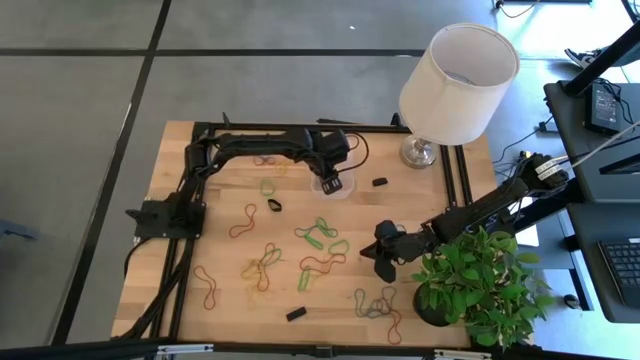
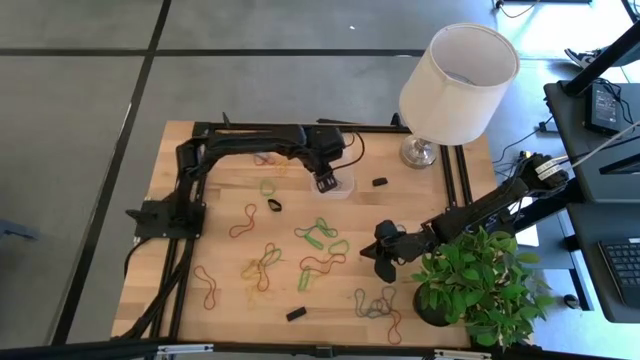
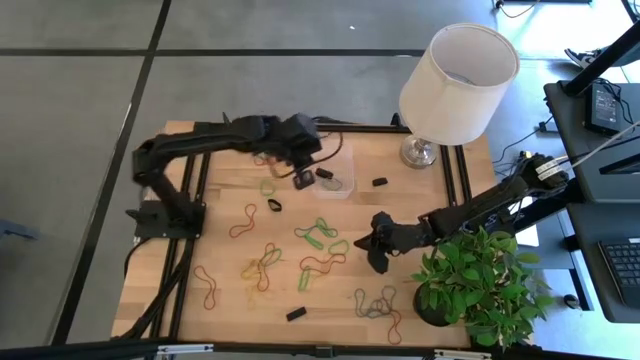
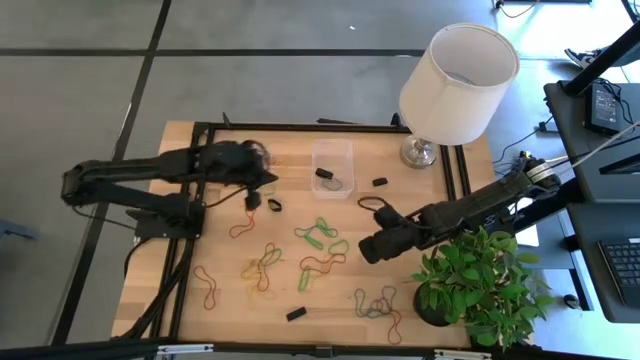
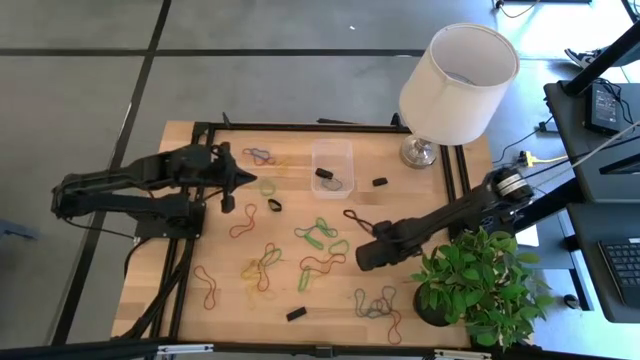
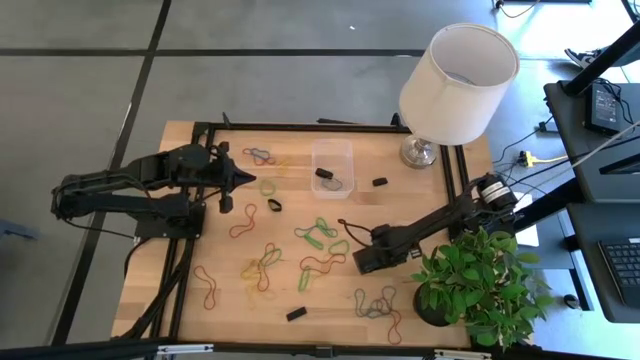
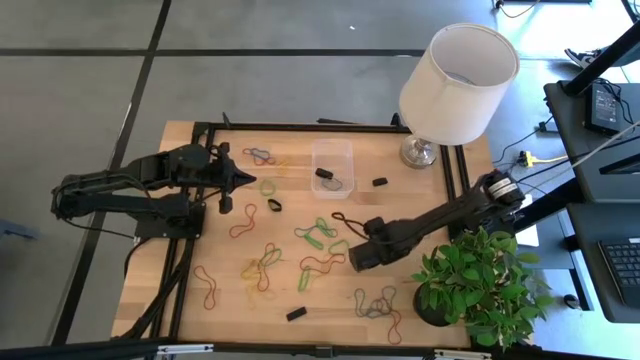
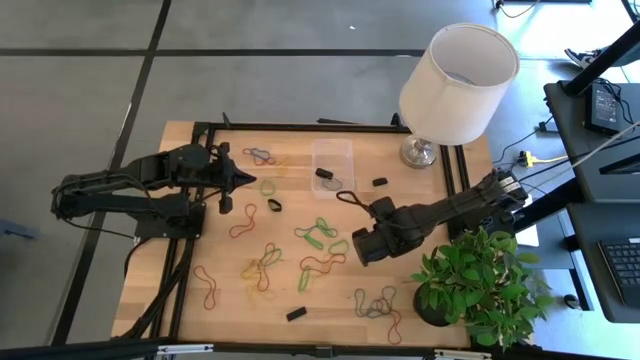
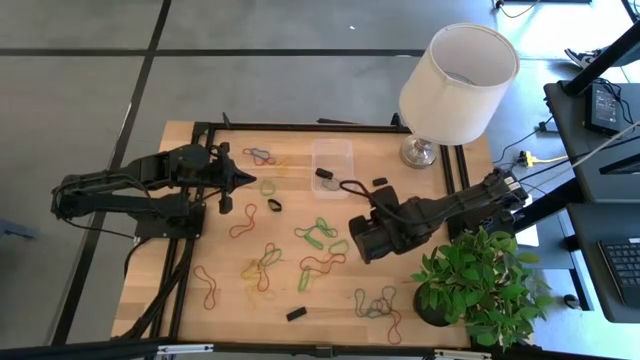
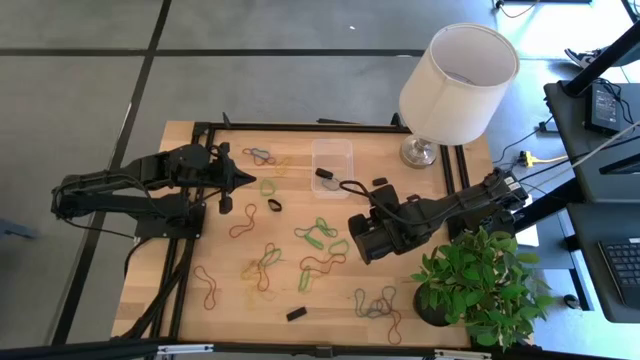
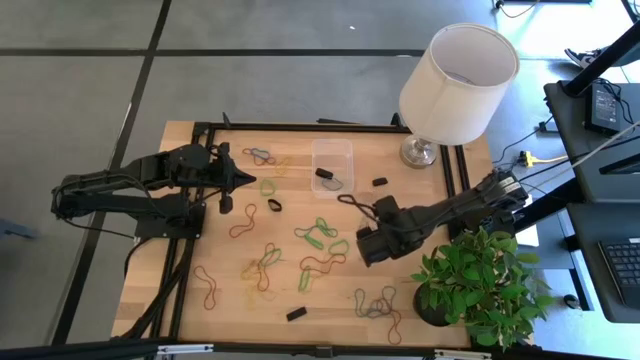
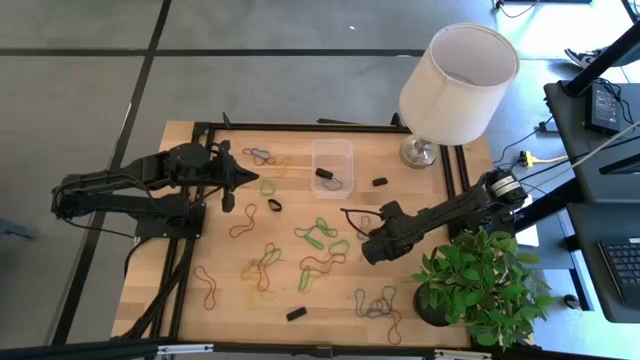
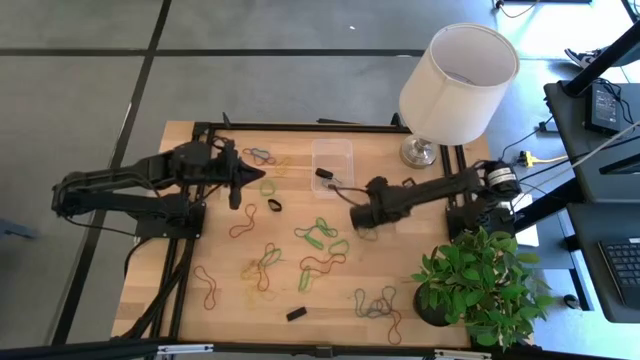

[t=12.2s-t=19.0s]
Task: Pick and place rubber bands into bin
Put the yellow rubber band into the transparent bin

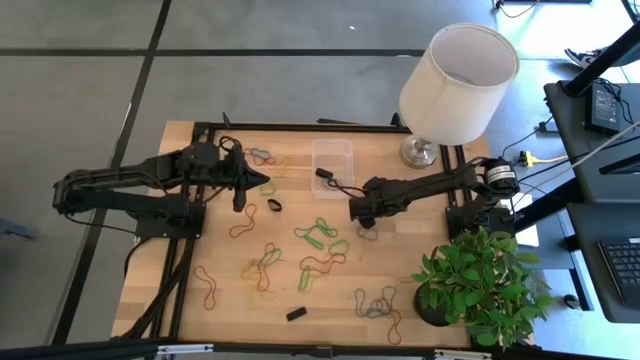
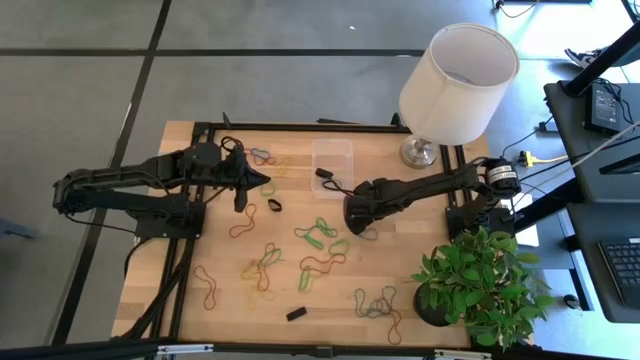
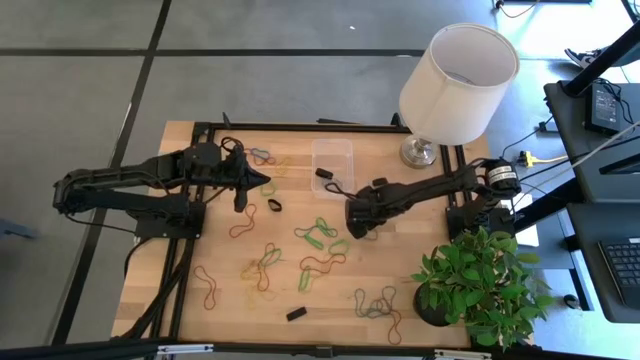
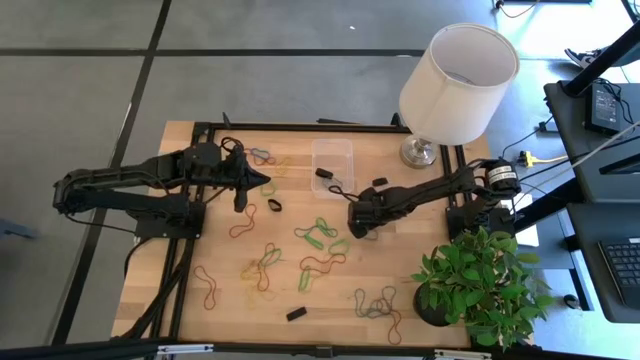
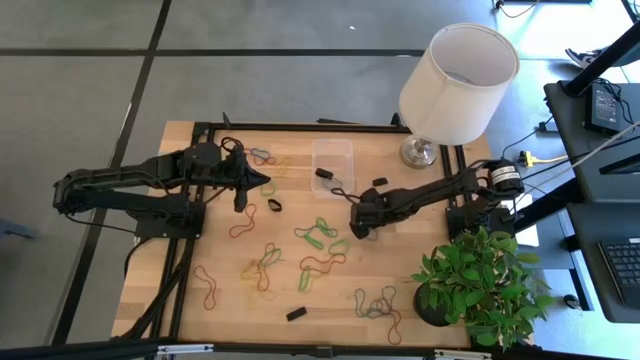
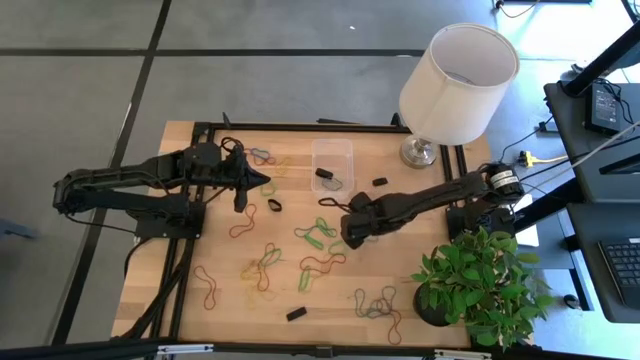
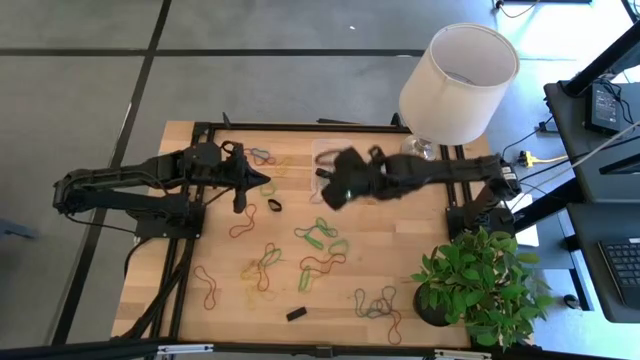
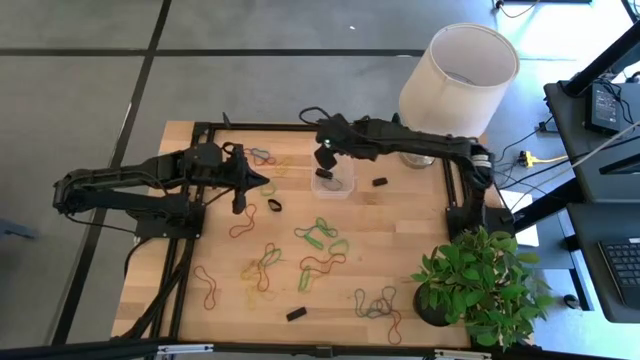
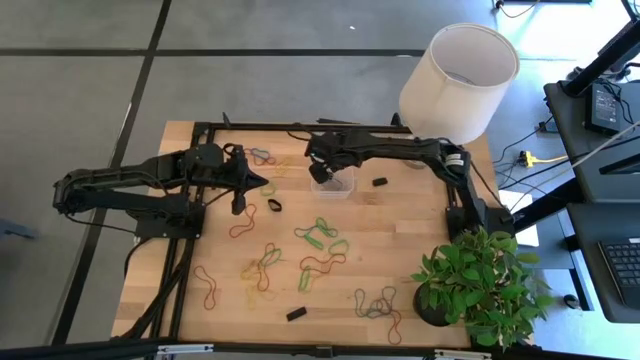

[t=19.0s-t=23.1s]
Put the blue rubber band into the transparent bin

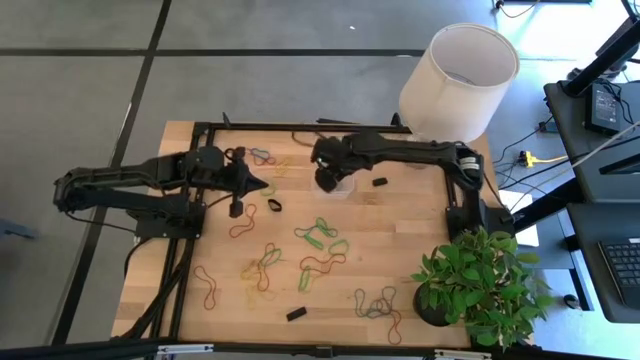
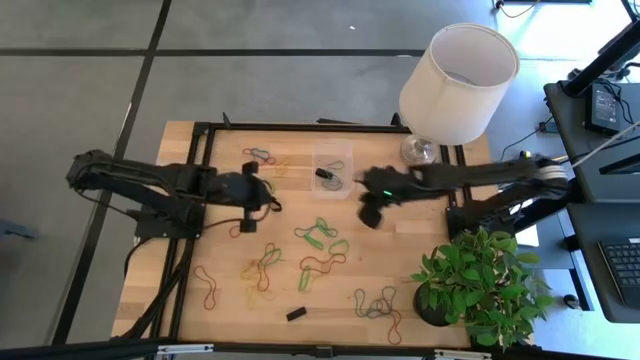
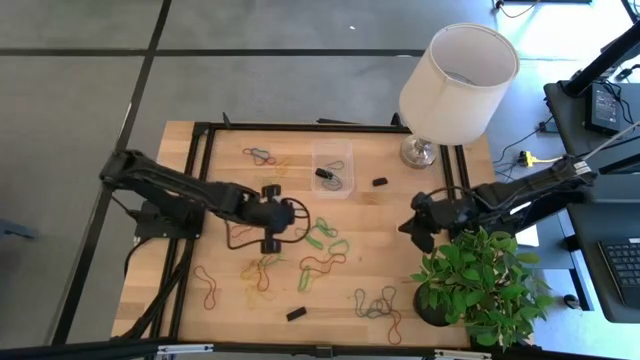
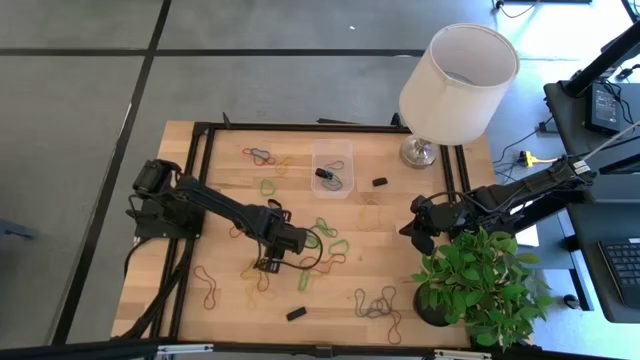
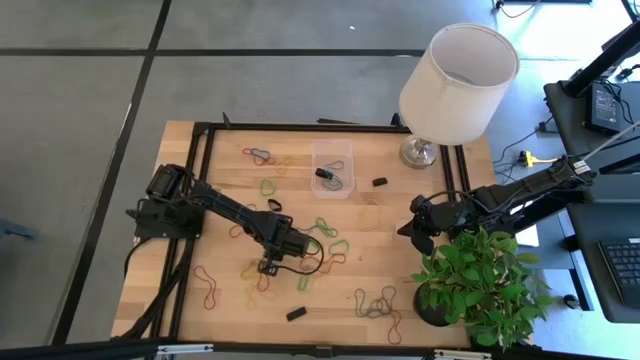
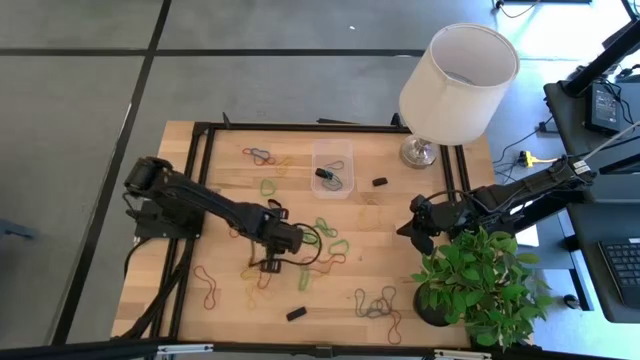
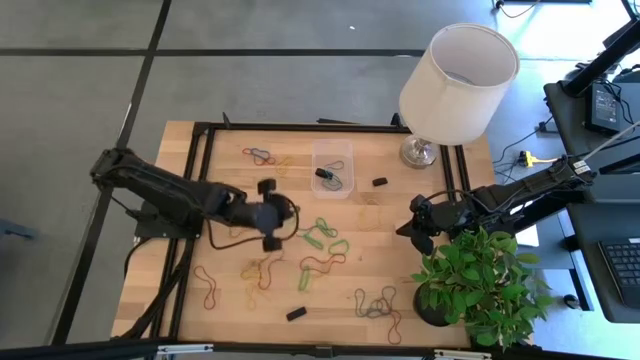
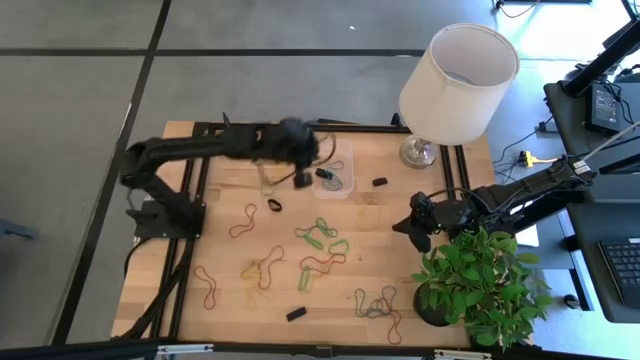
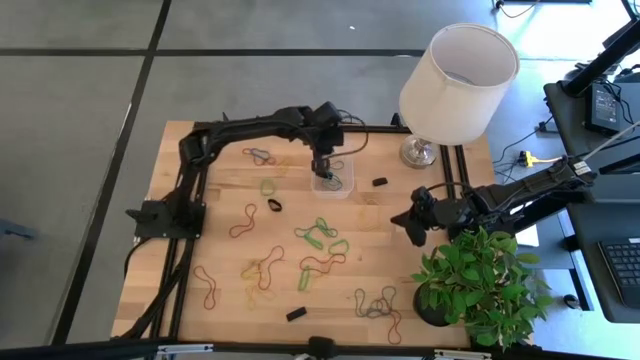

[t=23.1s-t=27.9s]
Put the green rubber band into the transparent bin

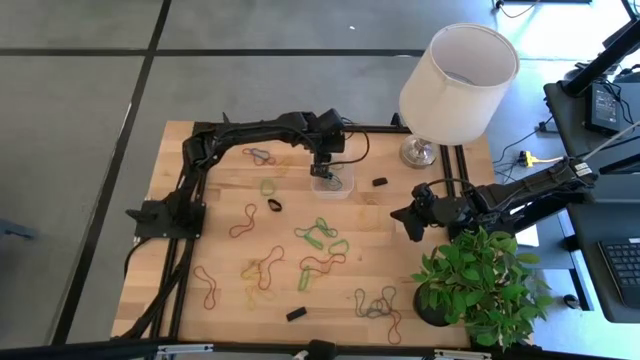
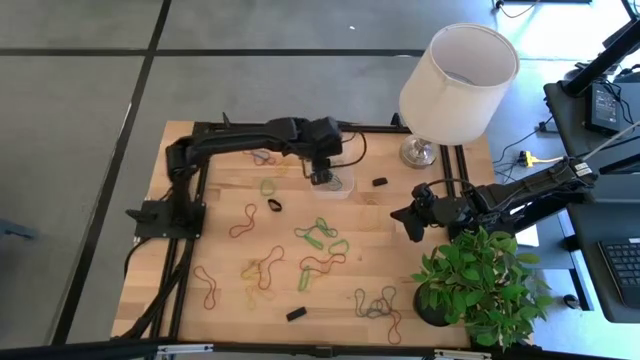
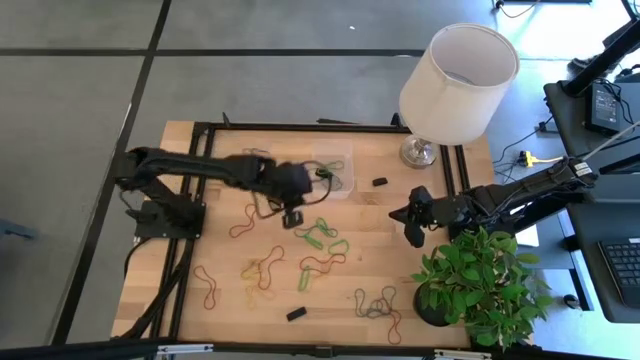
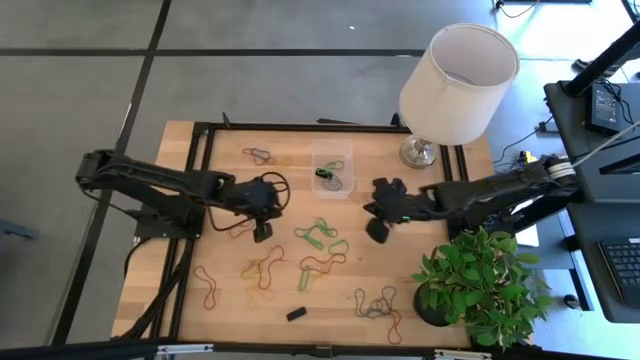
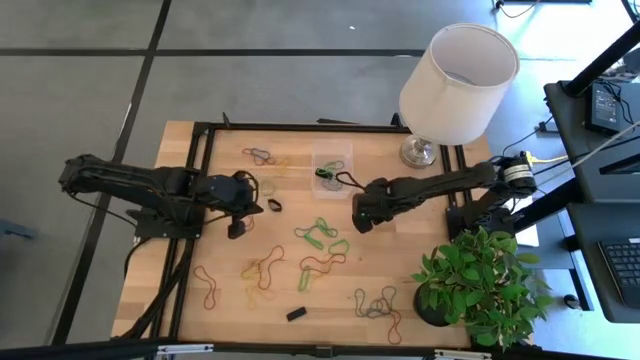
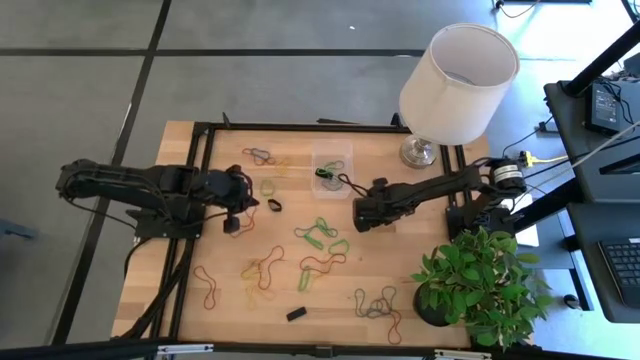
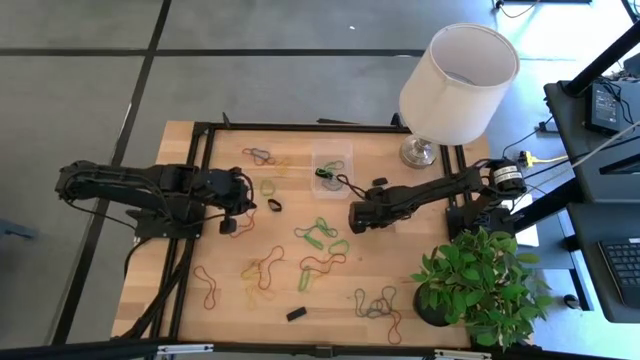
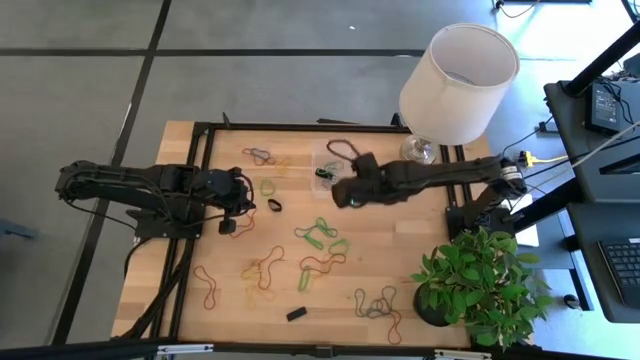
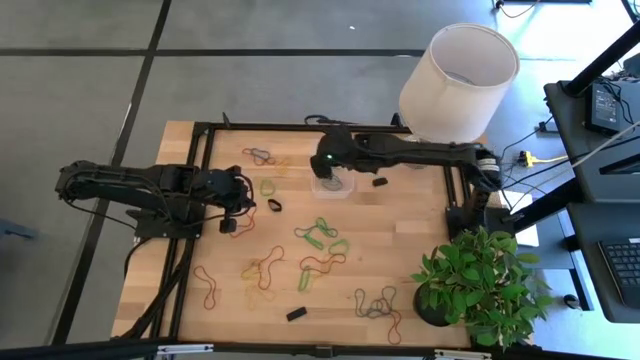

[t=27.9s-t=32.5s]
Put the yellow rubber band into the transparent bin

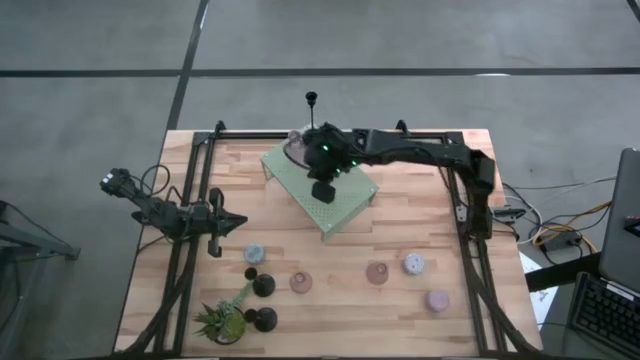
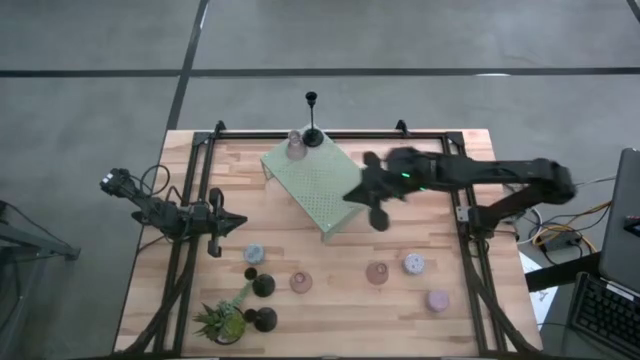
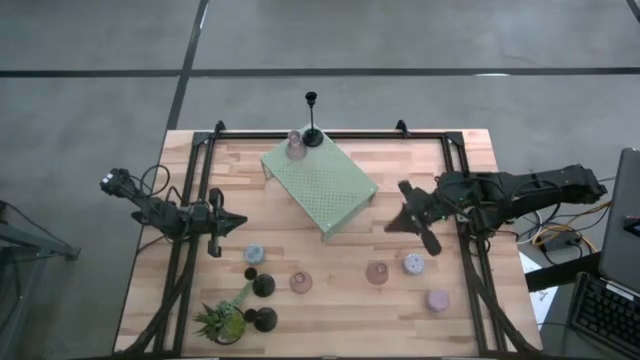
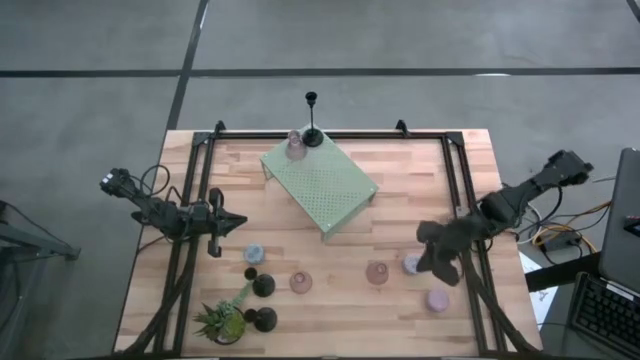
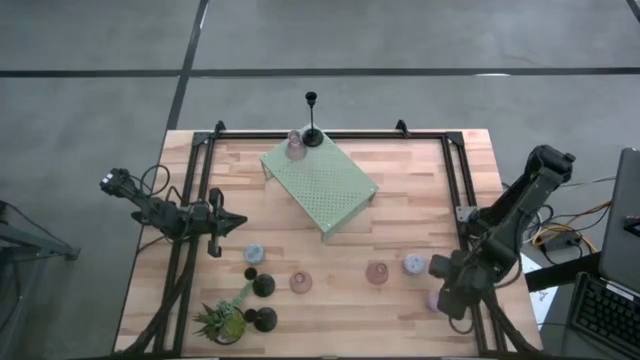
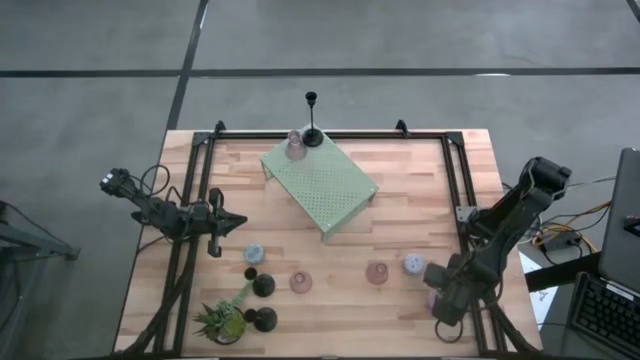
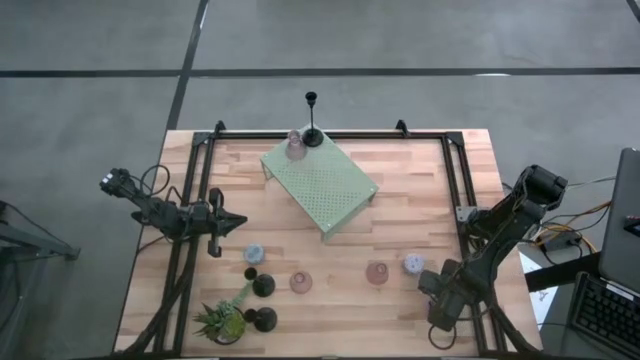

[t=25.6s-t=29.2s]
Task: Pick & Place candle stick holders
Put the pink scented candle on the shelf aligned with the pink glass candle holder
